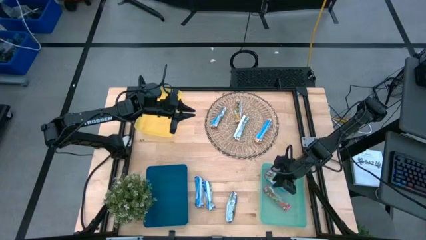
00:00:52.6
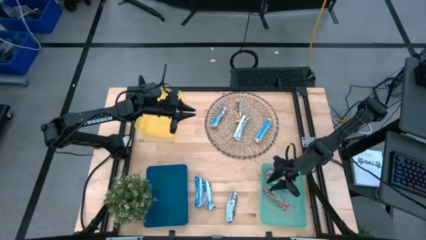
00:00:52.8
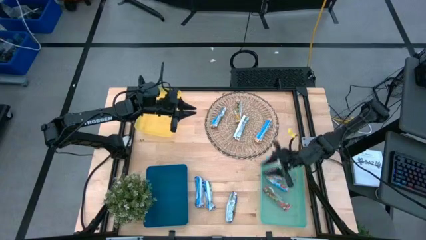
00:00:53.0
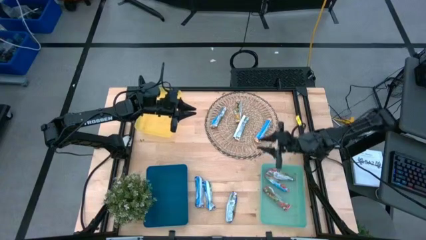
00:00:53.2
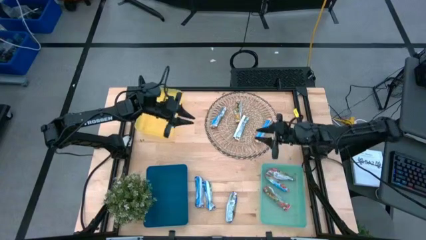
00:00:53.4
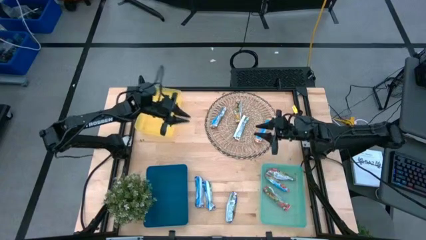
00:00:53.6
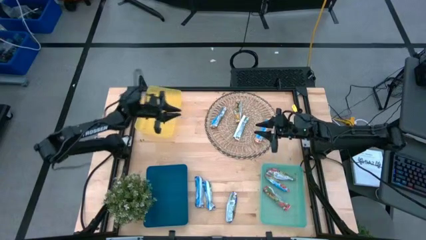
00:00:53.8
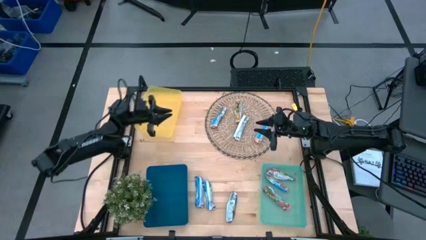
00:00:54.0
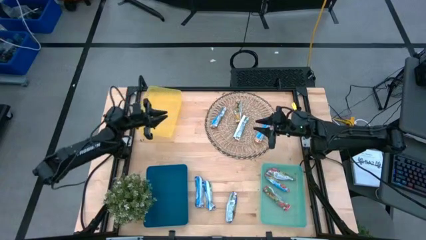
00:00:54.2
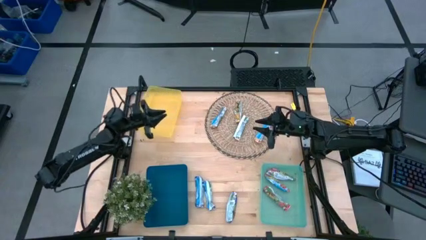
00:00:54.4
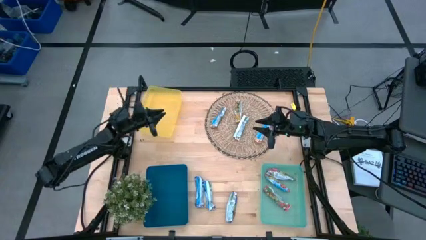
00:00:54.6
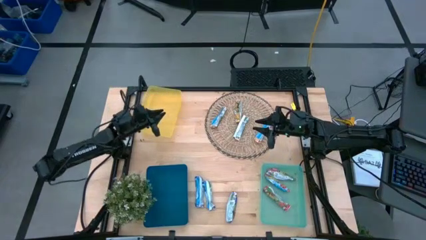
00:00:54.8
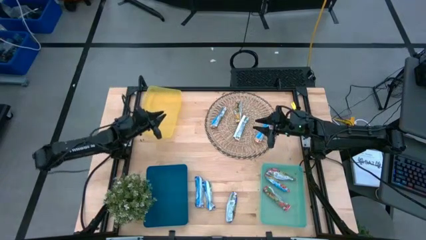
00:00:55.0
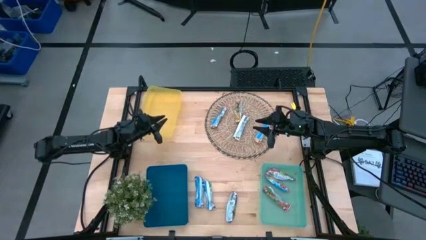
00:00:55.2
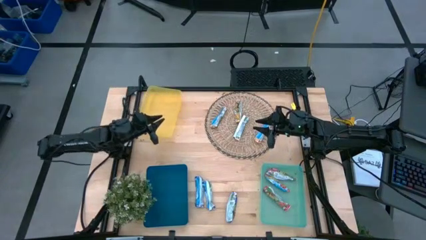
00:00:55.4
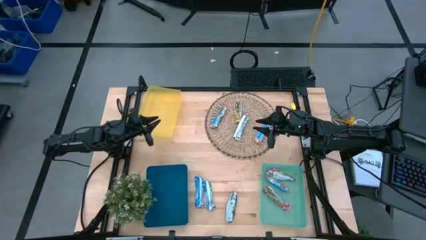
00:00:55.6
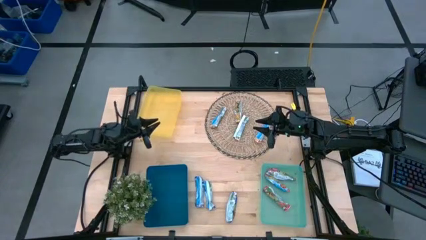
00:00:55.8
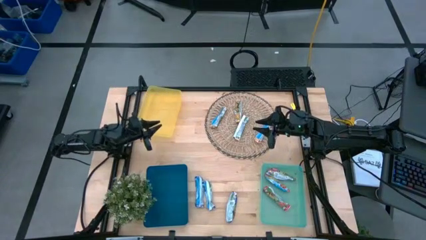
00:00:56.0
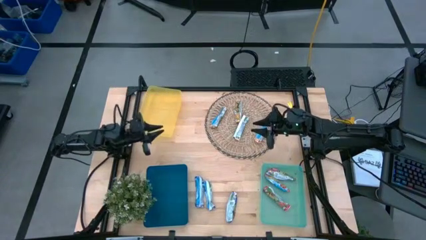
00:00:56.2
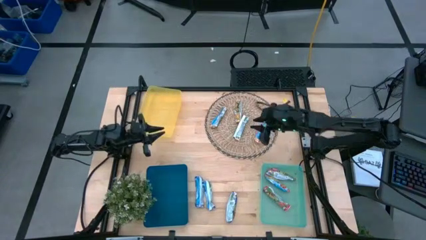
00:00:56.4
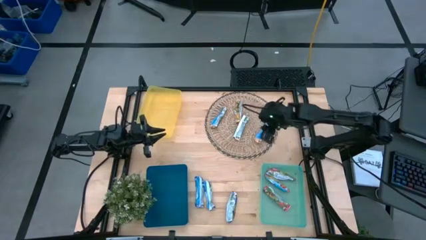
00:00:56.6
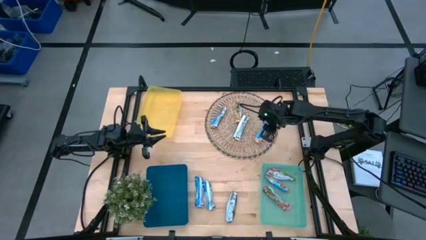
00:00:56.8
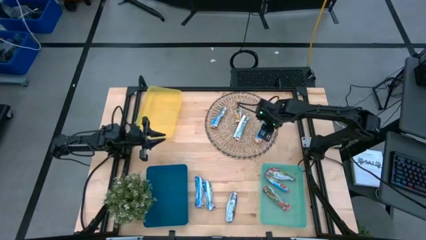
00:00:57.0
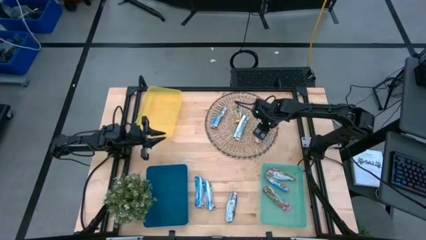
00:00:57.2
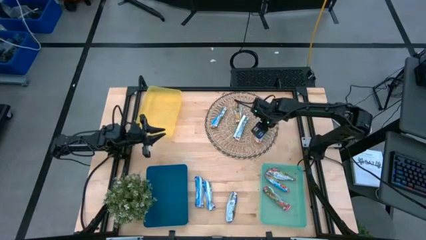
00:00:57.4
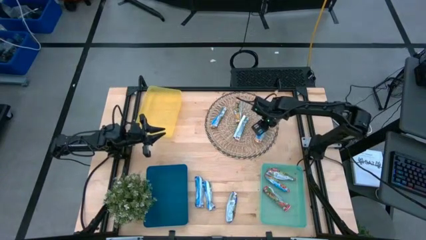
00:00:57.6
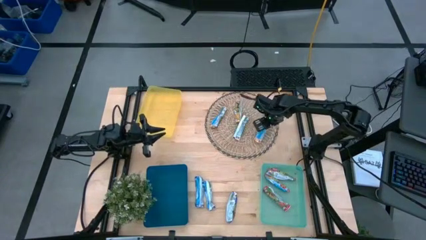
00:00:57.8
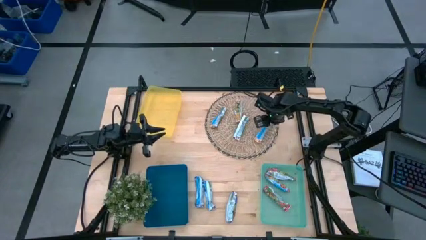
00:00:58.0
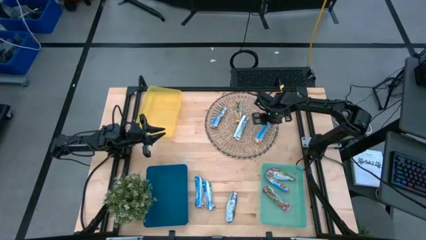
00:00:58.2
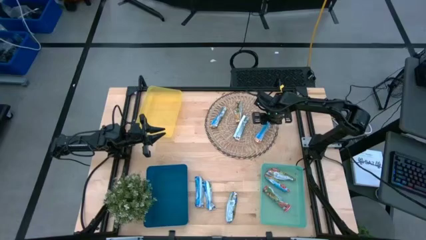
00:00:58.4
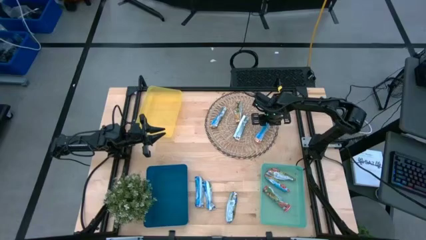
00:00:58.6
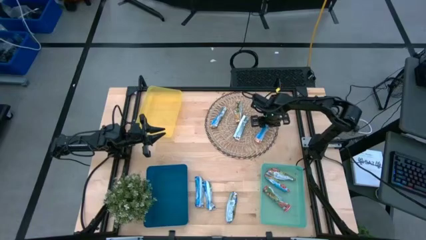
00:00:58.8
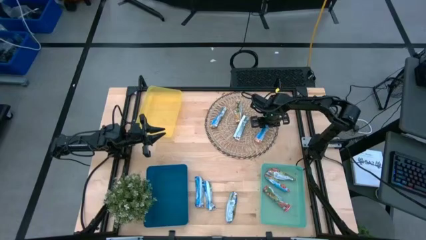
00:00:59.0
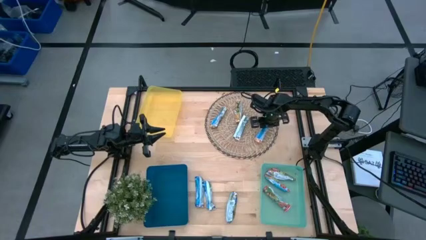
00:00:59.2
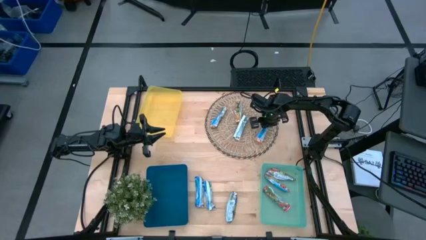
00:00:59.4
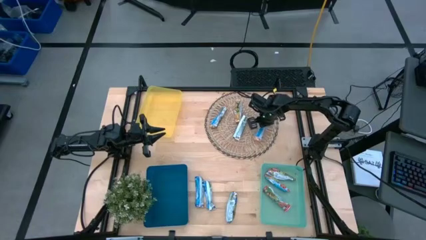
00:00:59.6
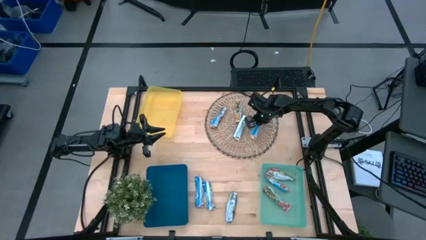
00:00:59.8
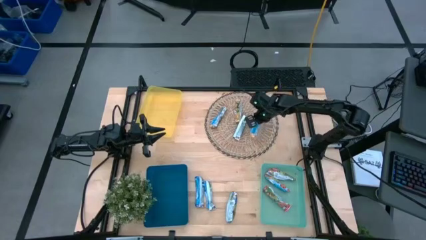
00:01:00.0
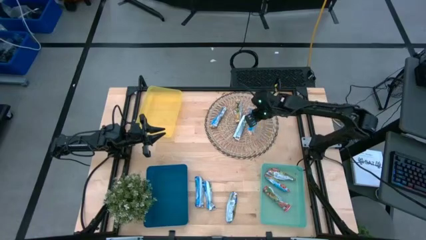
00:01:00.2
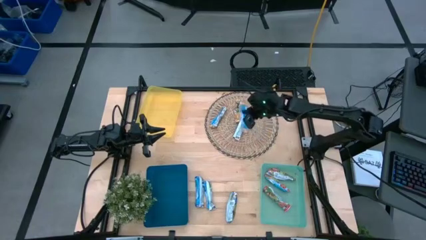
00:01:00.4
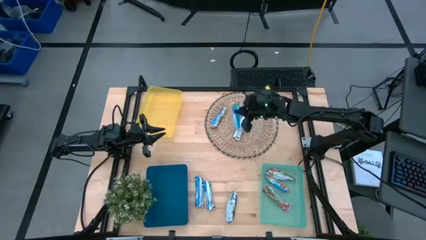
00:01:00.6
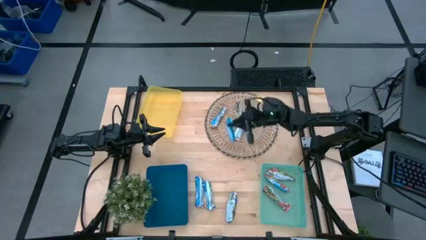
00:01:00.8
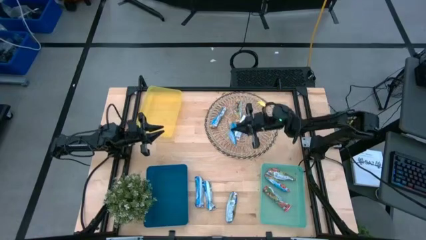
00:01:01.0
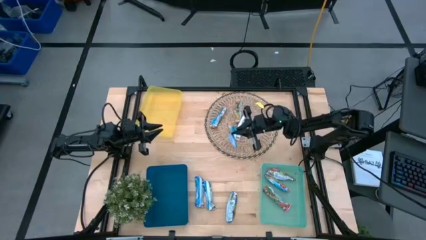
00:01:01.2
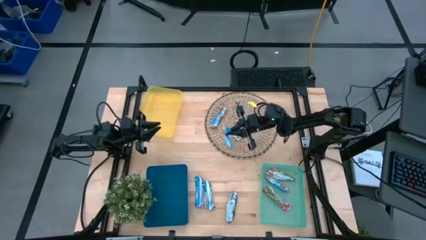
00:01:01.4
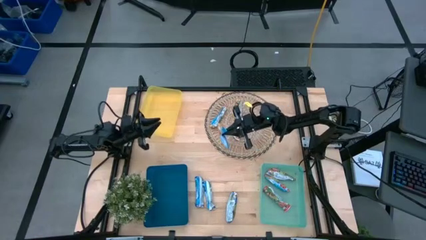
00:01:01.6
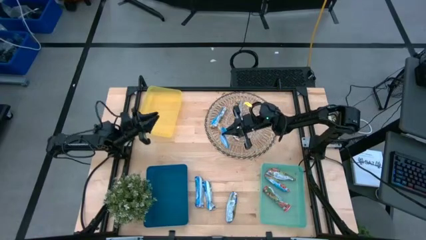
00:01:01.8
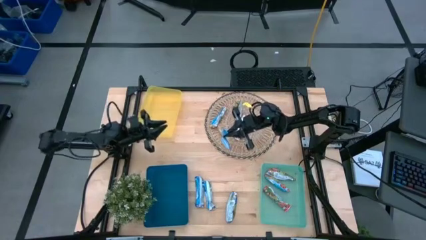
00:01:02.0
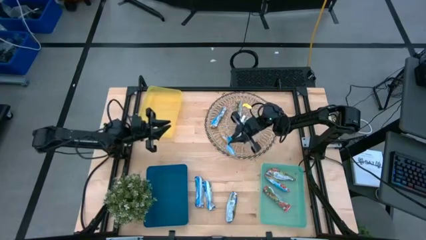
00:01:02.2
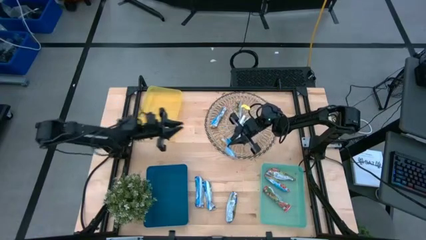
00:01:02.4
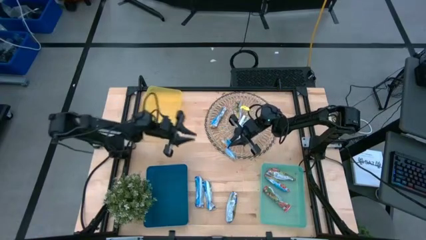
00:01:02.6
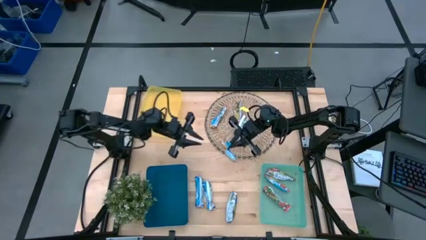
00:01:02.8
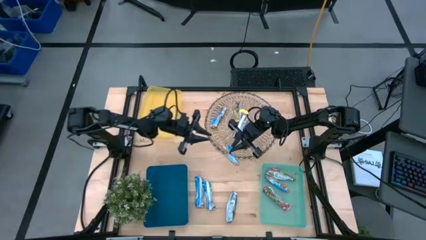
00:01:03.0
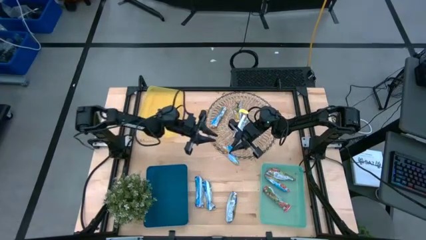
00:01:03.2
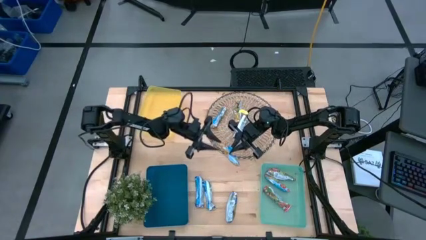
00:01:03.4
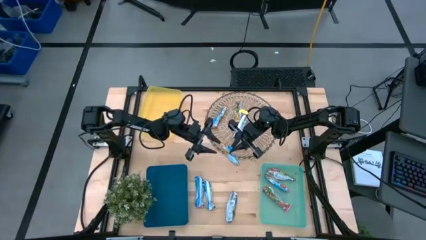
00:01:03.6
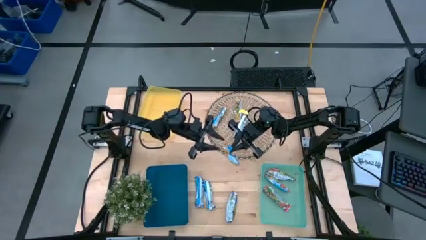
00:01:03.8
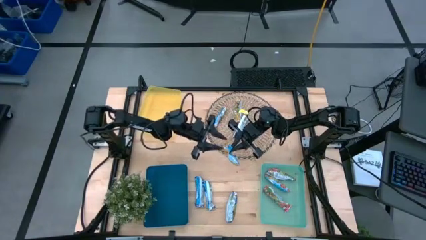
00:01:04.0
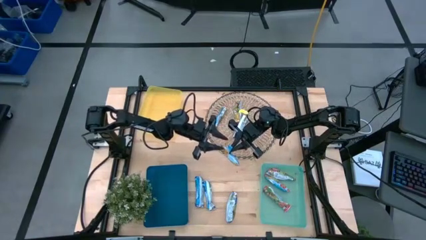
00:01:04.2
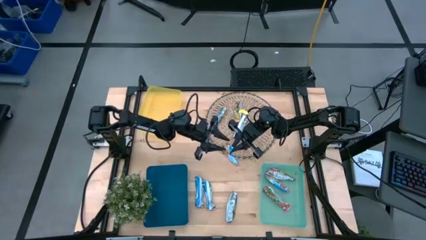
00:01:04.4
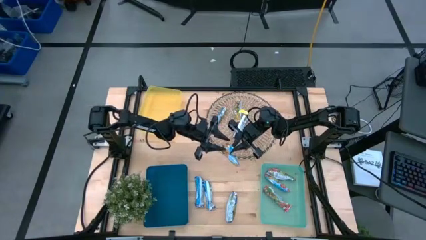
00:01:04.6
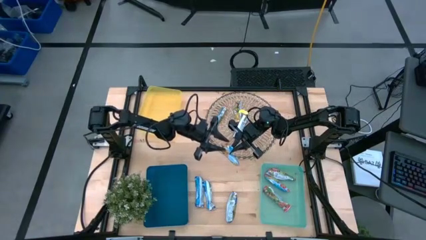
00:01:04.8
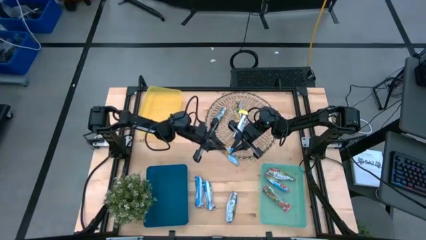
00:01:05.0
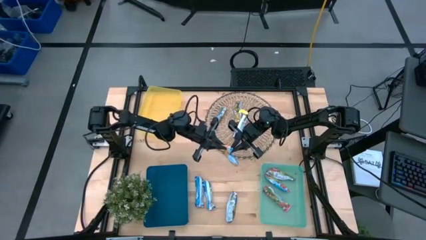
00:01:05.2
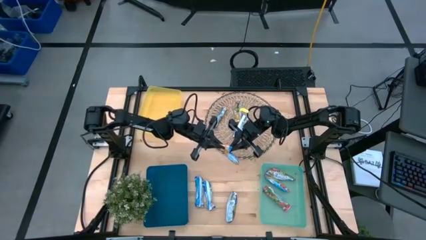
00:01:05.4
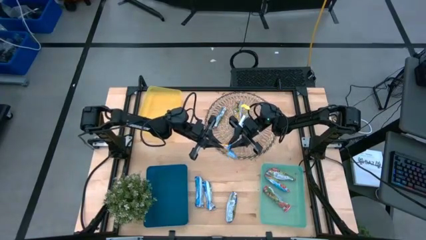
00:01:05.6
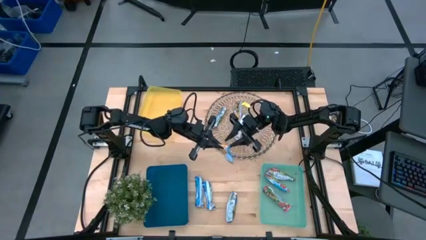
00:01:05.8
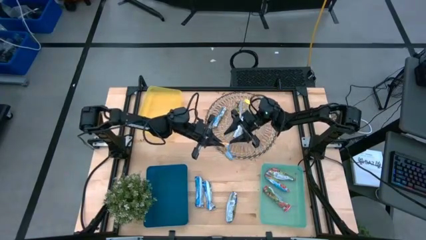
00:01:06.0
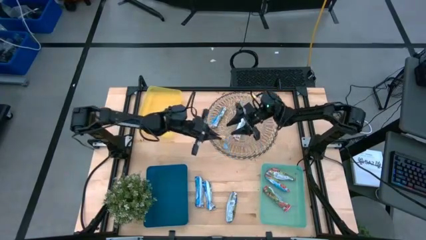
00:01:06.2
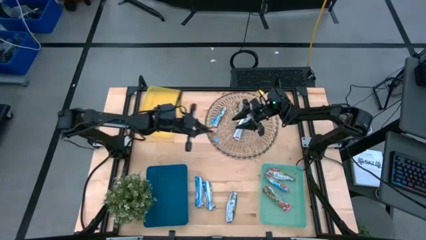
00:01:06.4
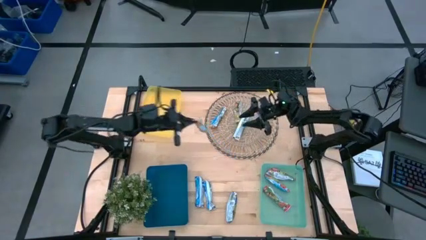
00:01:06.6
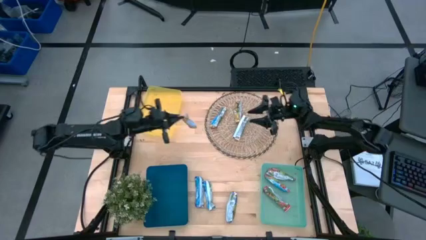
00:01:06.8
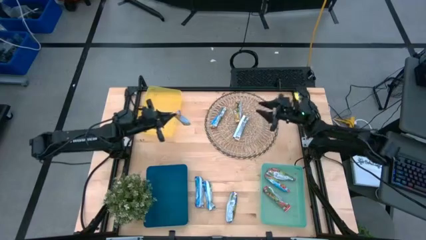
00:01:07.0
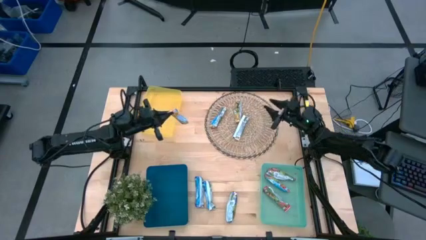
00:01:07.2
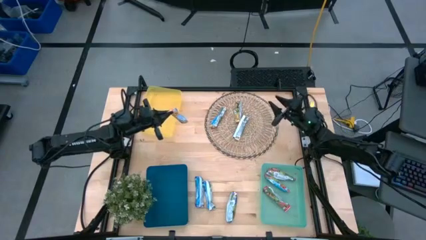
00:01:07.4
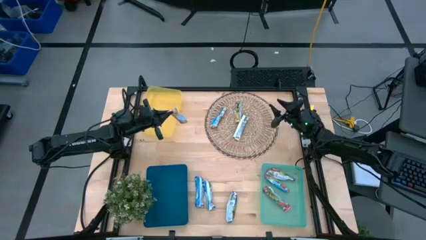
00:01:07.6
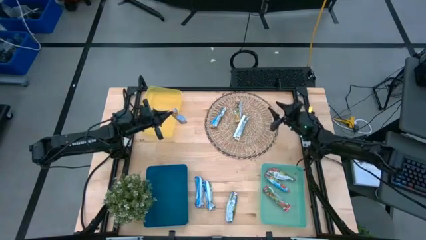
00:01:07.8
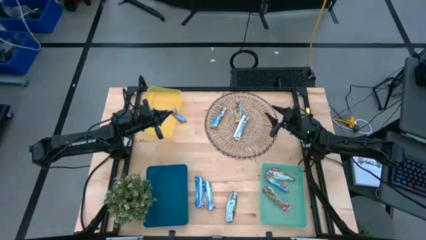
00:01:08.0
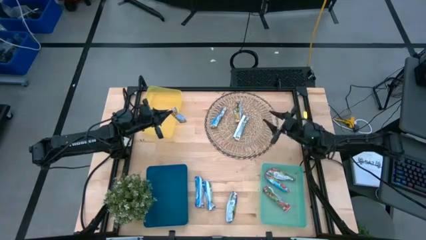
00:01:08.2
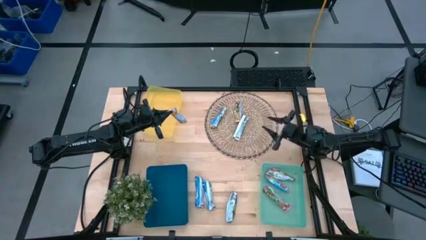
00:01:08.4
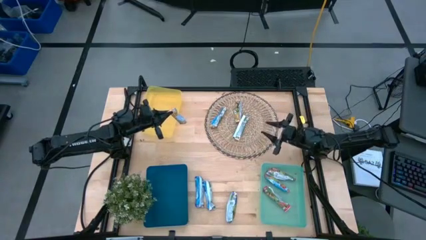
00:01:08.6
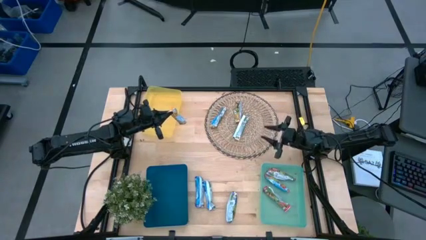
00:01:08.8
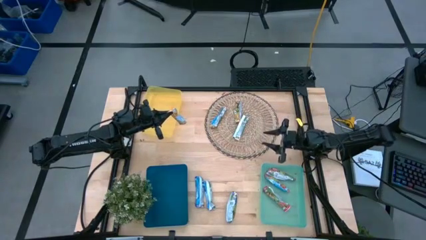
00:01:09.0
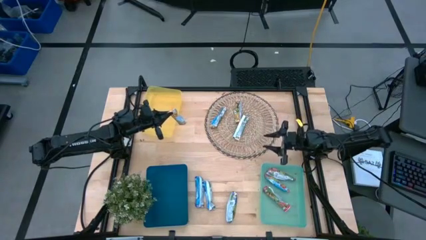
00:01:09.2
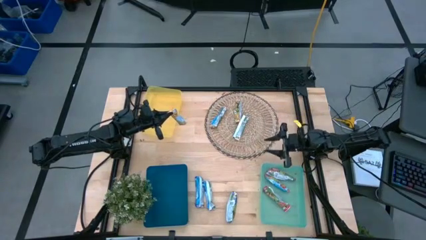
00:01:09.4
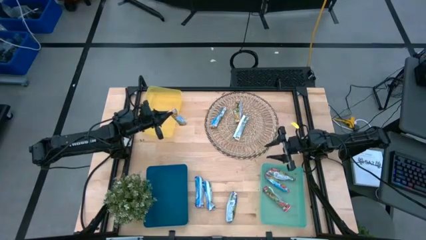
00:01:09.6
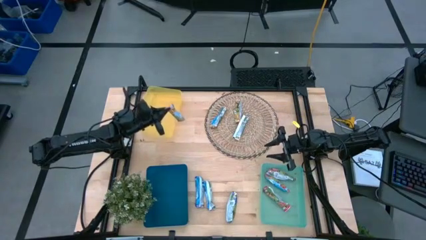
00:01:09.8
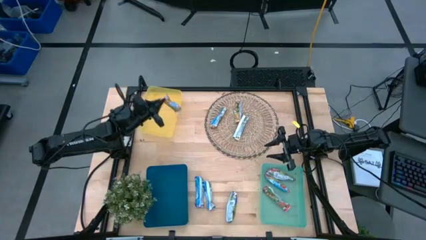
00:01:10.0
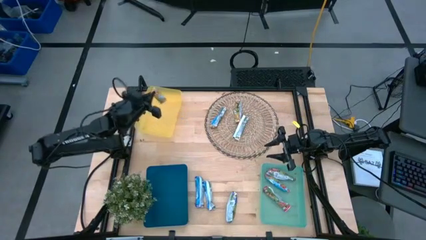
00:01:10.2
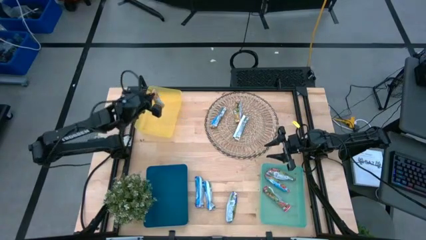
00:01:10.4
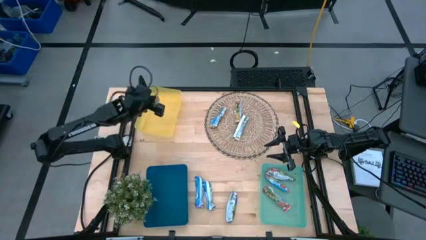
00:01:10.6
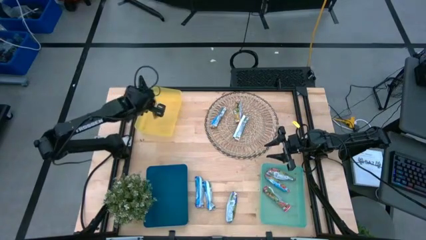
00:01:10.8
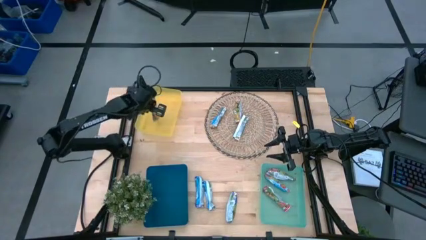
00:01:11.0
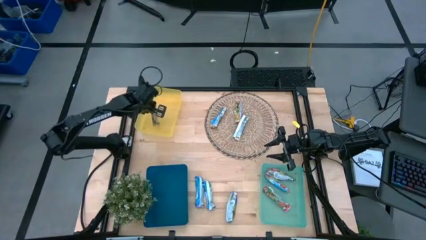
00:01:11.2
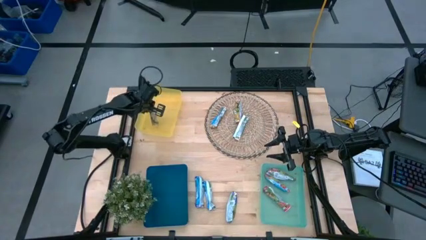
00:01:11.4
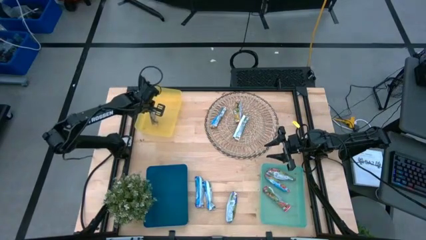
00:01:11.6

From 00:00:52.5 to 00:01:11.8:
Task: Pick and place Granola Bars by type
Put the yellow granola bar into the yellow bin
